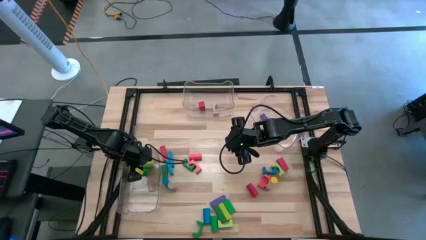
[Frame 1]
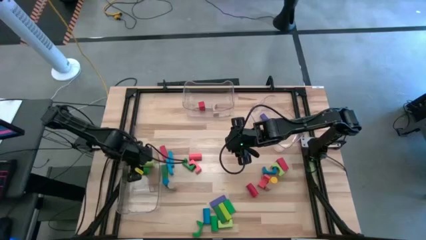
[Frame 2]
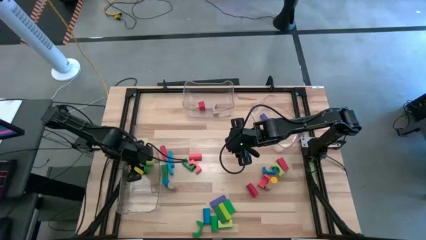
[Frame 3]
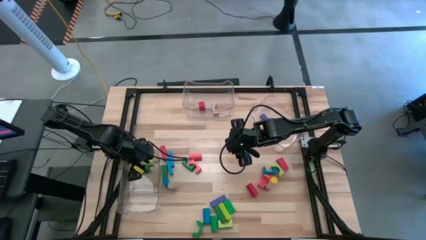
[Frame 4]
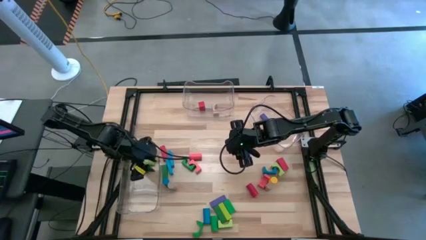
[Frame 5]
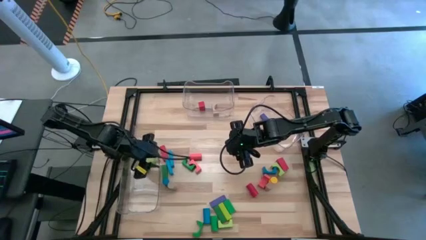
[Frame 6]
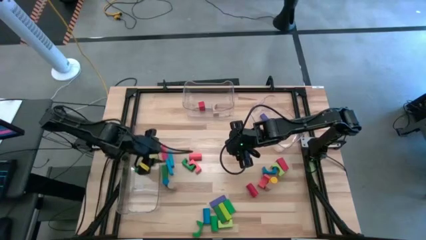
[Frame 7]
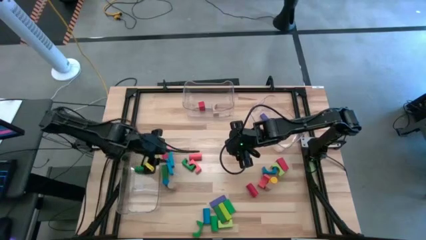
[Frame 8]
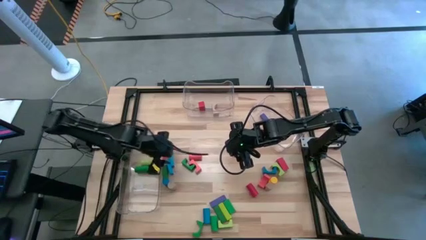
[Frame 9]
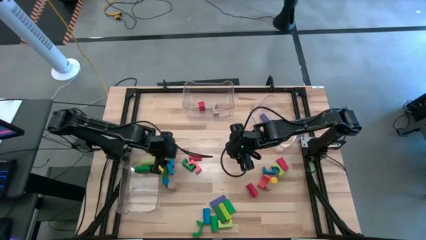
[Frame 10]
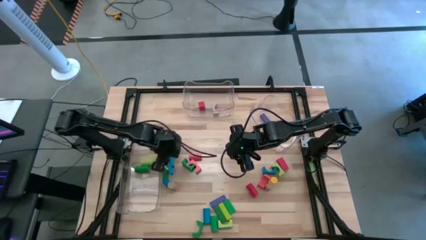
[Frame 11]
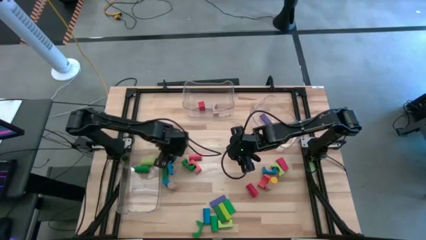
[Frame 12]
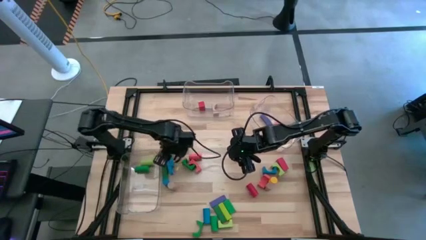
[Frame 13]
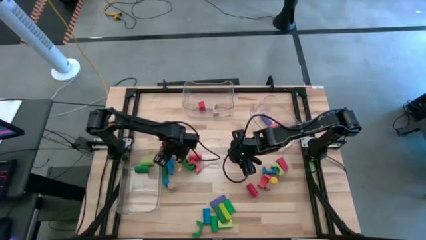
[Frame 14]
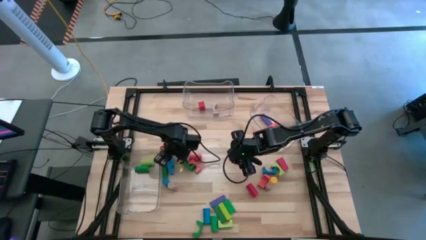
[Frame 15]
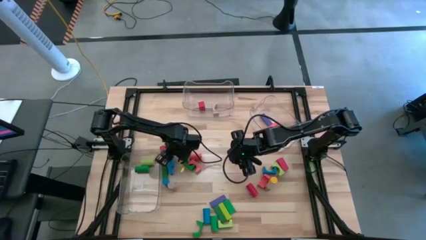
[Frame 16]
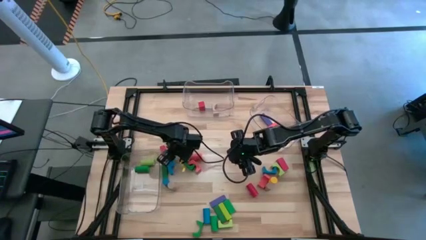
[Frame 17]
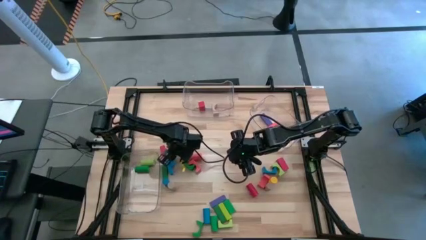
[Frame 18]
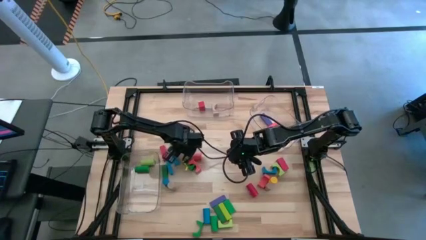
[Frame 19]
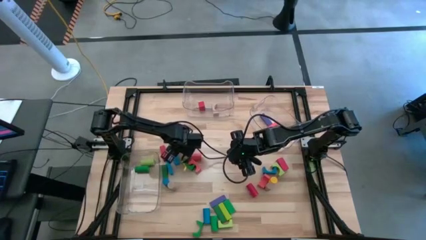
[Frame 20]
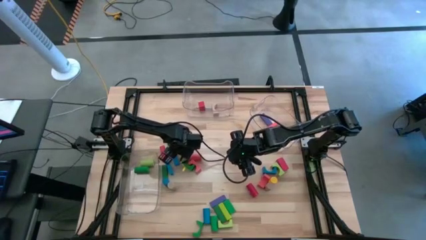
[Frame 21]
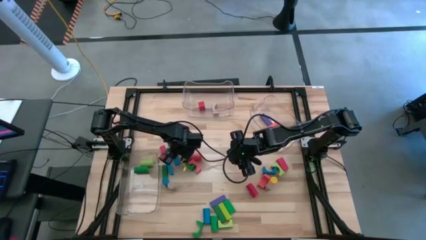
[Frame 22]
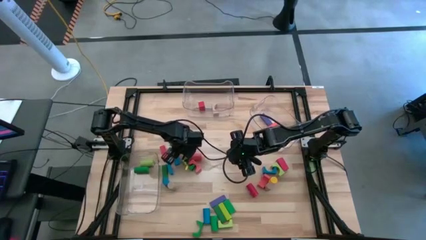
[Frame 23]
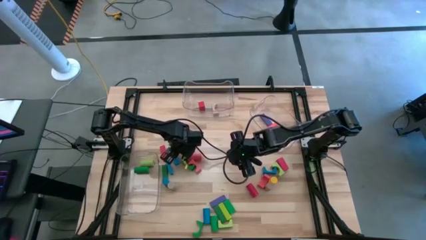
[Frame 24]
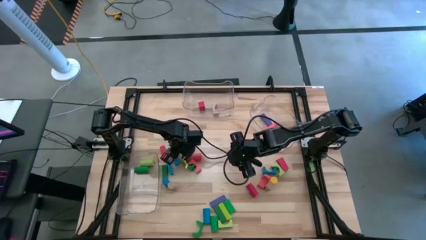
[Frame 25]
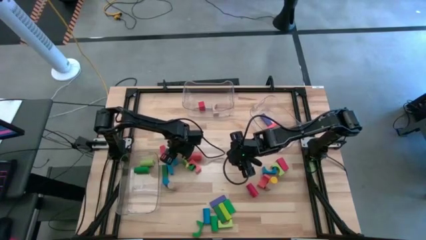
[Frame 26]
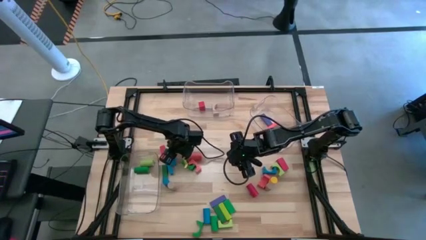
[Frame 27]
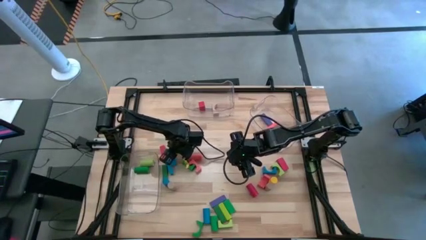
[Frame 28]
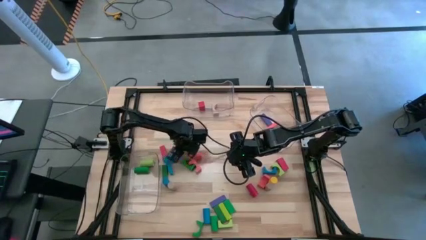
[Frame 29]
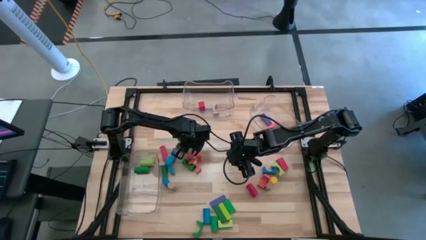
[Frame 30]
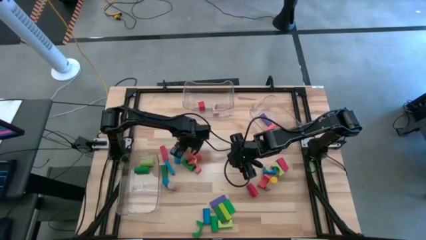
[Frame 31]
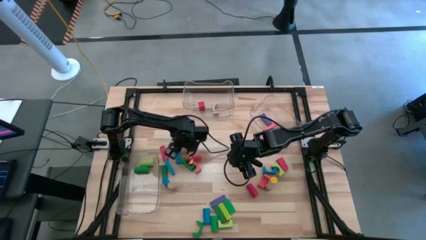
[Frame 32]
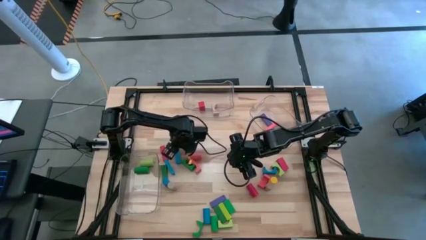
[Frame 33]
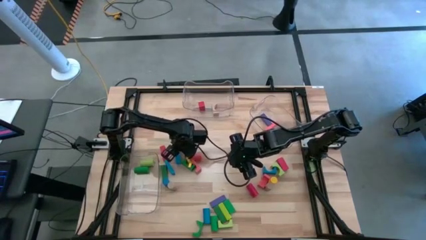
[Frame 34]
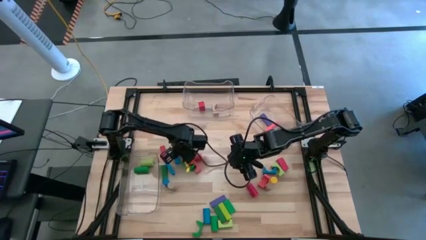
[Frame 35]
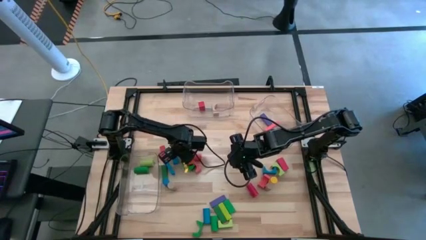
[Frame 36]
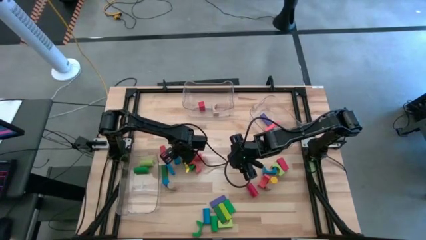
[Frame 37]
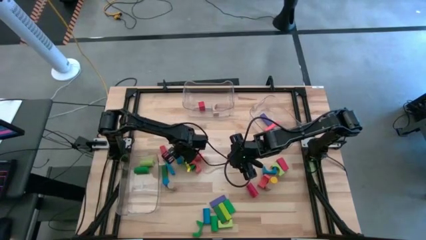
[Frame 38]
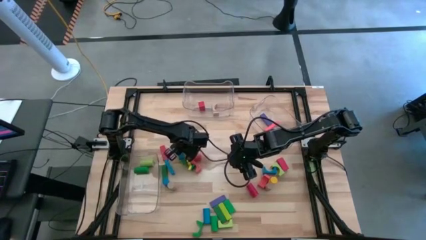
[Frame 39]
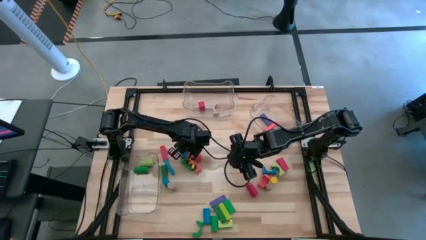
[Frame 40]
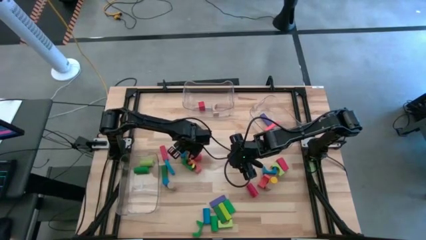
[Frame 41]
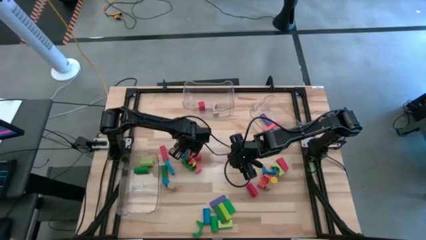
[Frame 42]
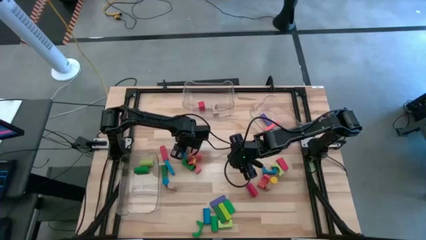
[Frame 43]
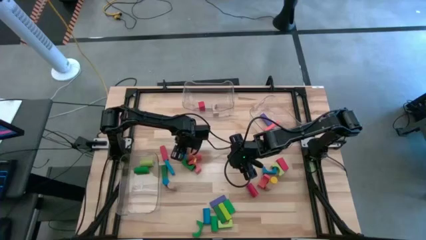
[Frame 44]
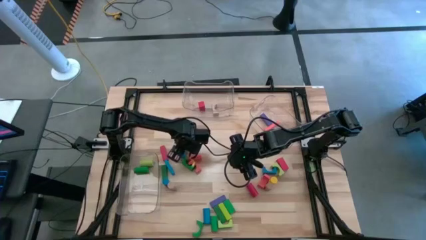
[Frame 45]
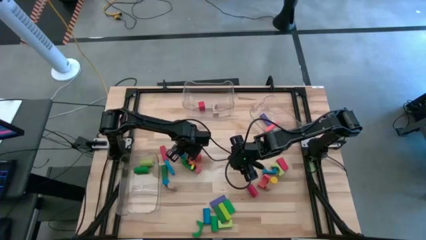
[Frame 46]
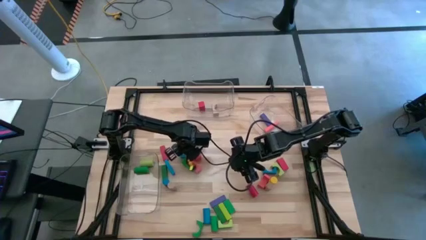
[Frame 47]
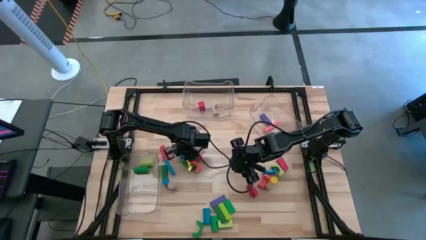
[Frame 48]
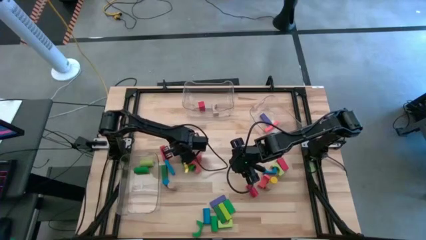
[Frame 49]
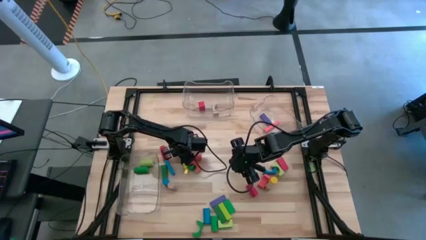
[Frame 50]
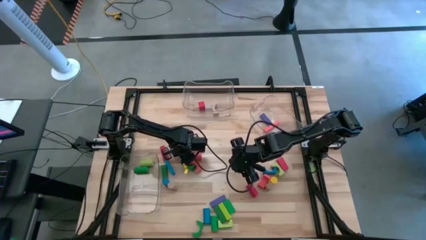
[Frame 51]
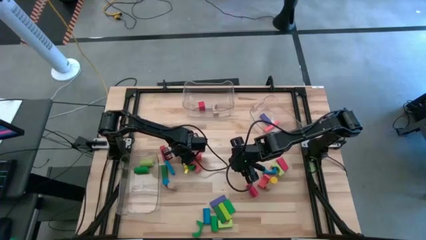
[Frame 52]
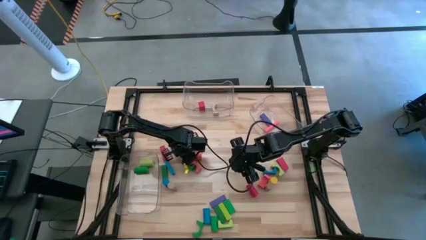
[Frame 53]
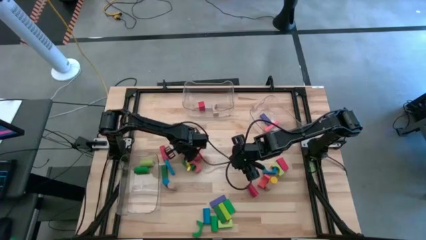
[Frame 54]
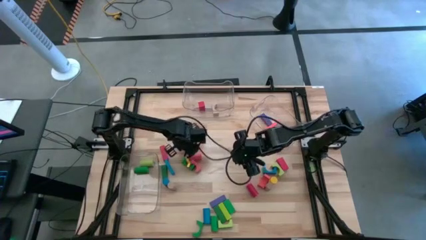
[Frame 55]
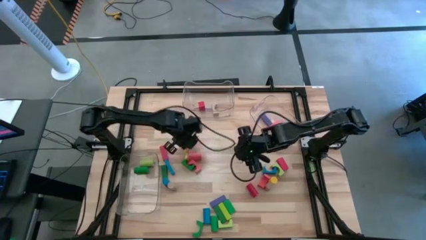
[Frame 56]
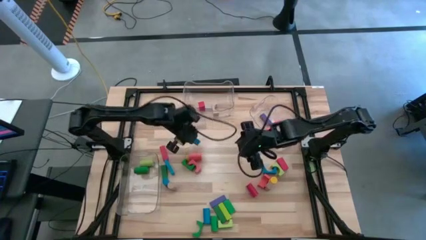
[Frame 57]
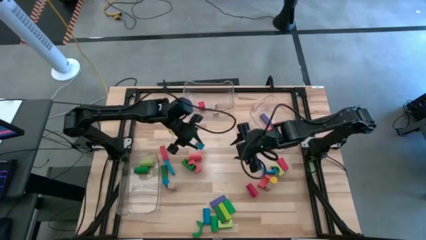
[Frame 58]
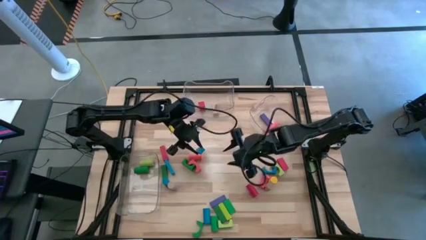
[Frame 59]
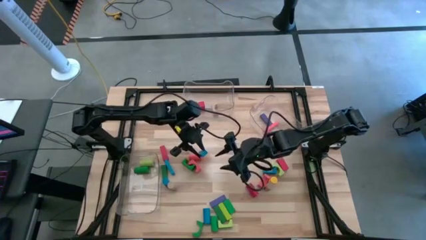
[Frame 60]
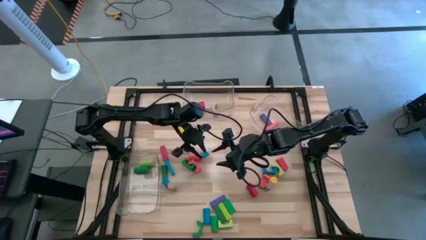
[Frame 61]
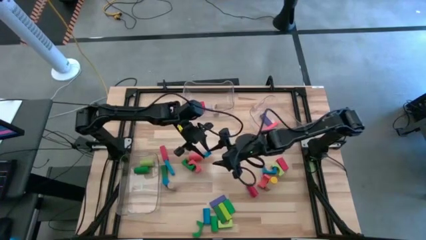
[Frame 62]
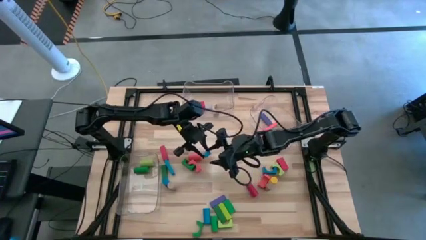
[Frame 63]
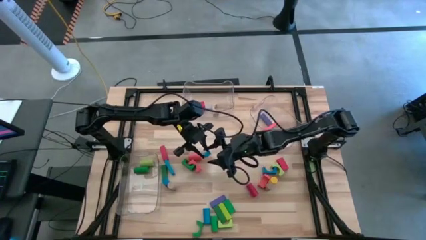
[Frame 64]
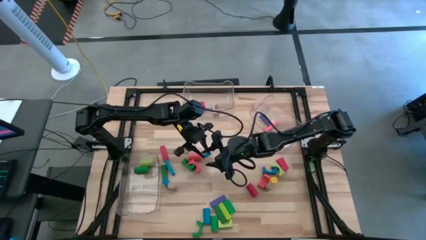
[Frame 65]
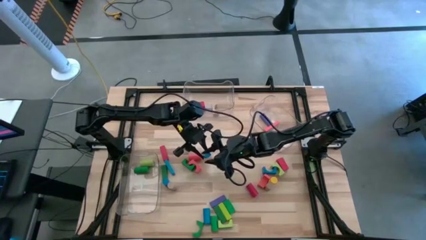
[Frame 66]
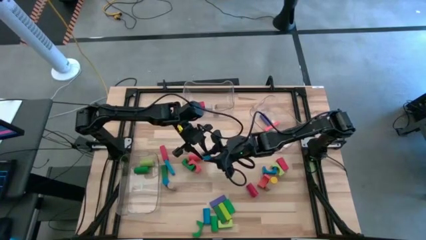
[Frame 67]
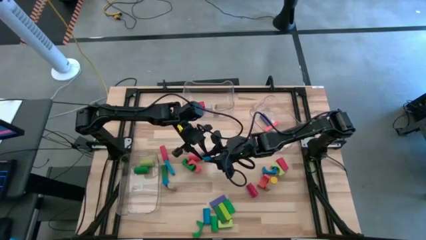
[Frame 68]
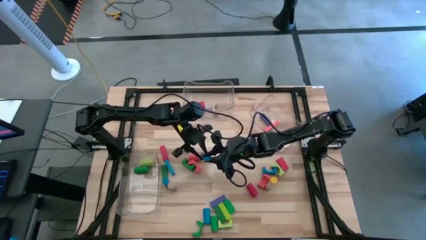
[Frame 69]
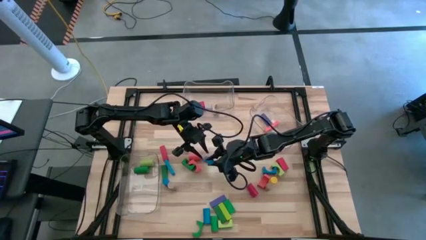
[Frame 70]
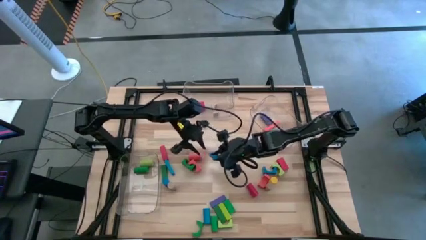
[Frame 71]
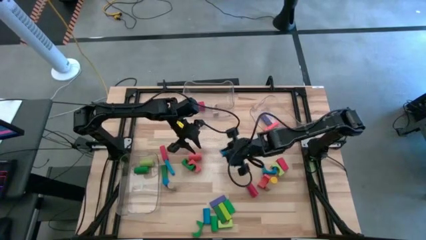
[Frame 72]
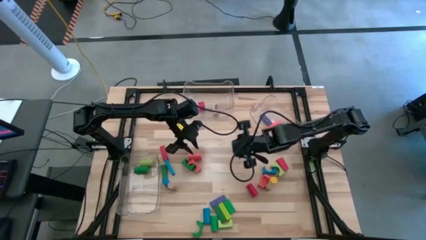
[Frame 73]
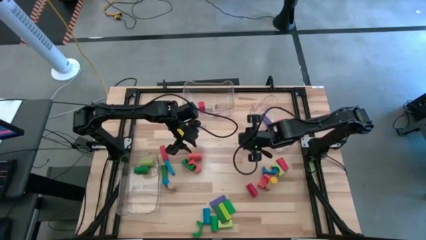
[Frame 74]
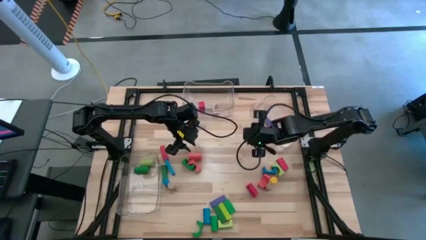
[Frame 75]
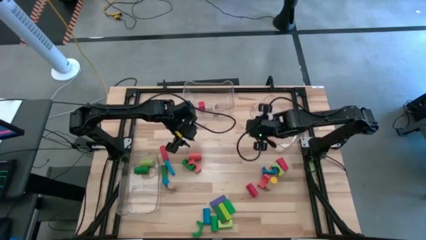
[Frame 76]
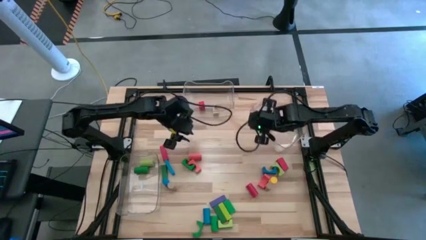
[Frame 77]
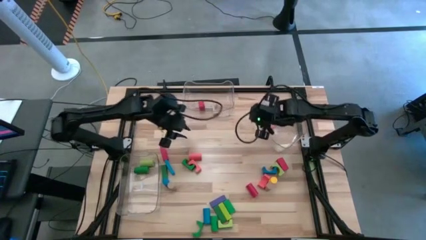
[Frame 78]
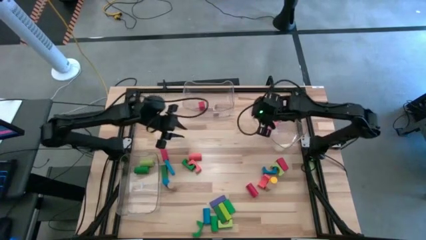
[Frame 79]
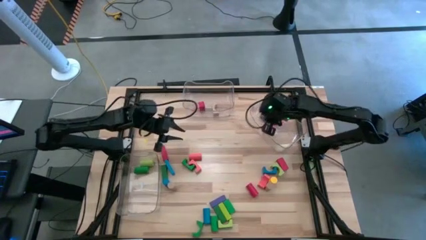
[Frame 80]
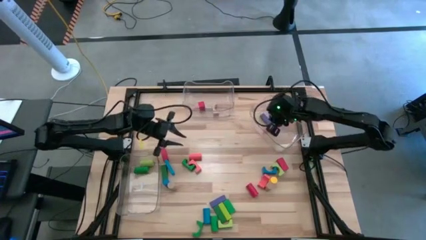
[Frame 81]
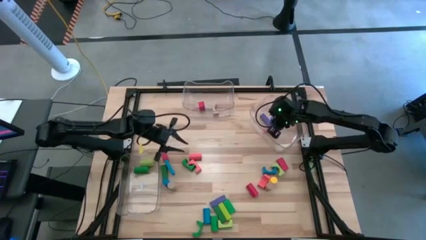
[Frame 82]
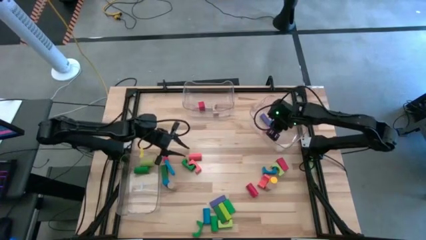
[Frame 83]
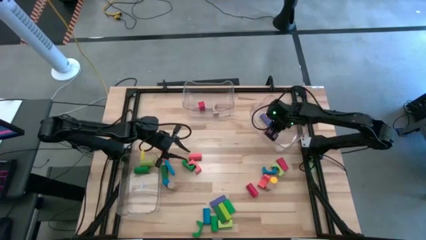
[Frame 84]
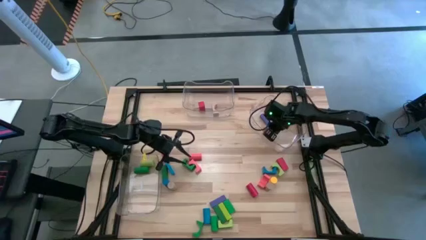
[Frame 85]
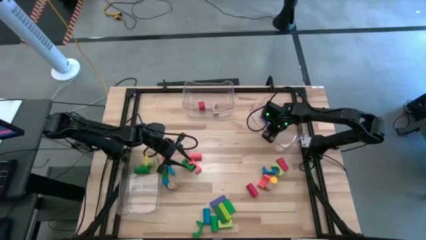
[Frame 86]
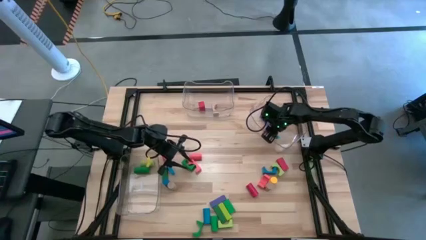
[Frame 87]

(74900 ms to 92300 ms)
Task: Sort blocks by size
Put the light blue rectangular block into the right transparent bin
